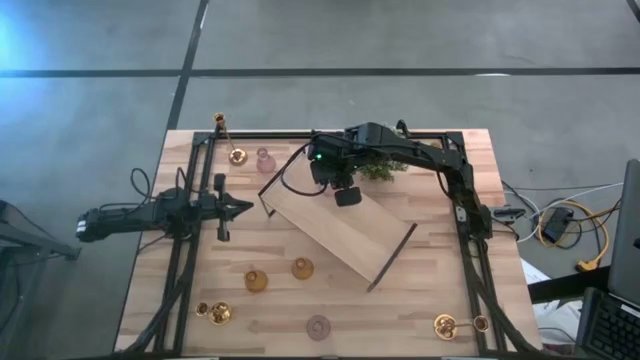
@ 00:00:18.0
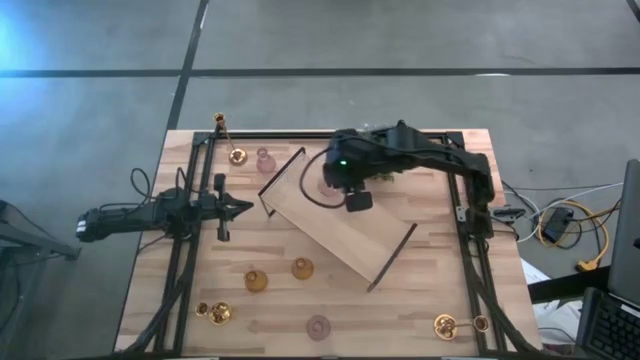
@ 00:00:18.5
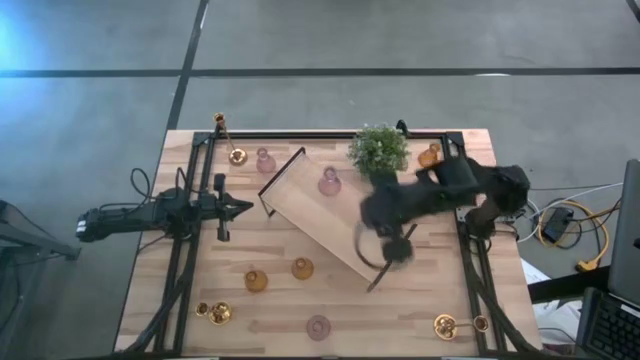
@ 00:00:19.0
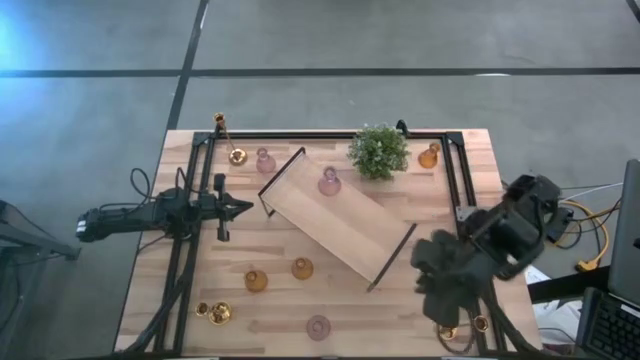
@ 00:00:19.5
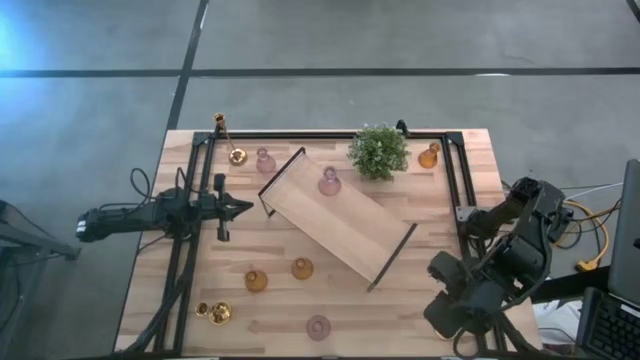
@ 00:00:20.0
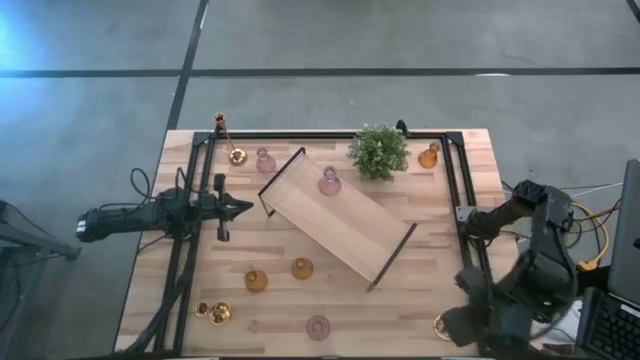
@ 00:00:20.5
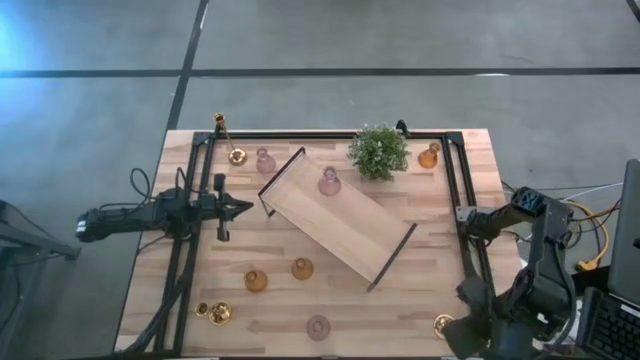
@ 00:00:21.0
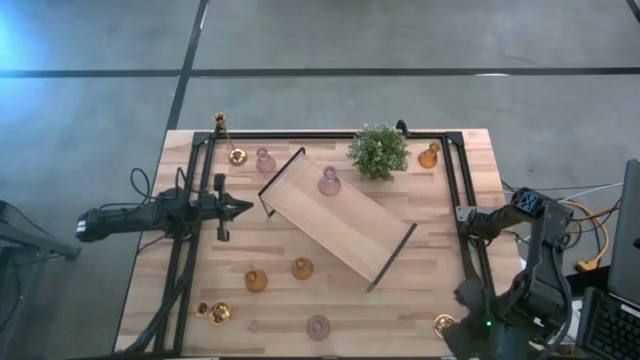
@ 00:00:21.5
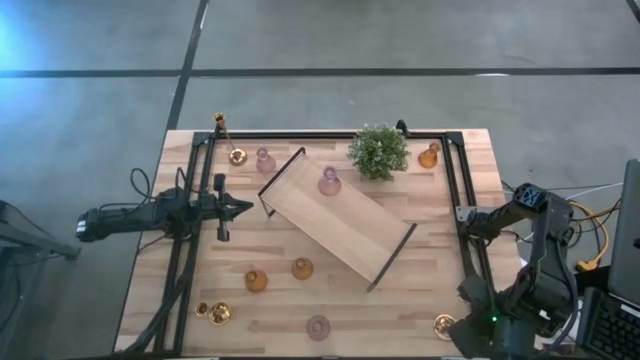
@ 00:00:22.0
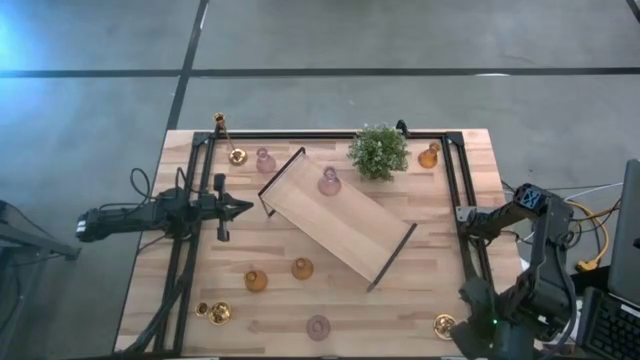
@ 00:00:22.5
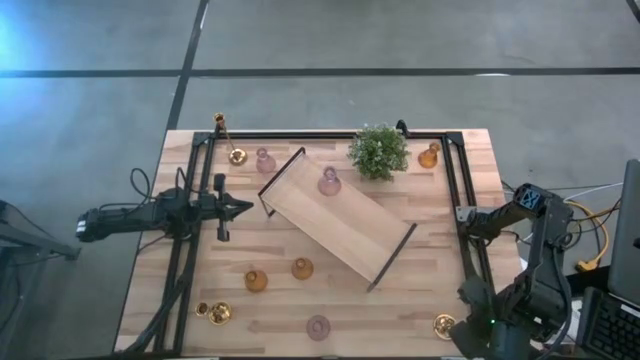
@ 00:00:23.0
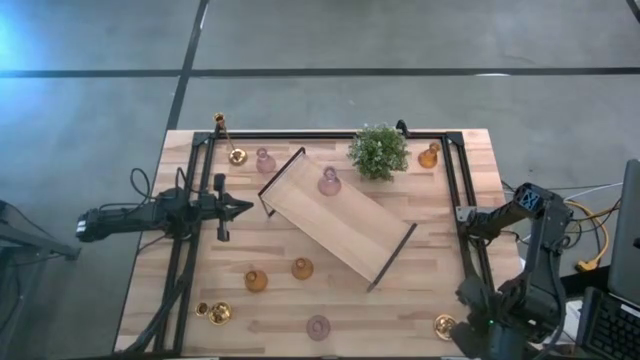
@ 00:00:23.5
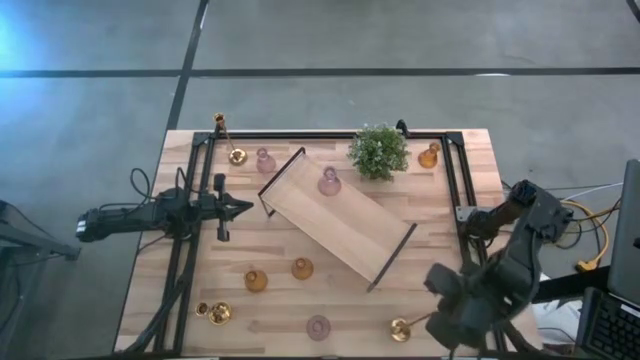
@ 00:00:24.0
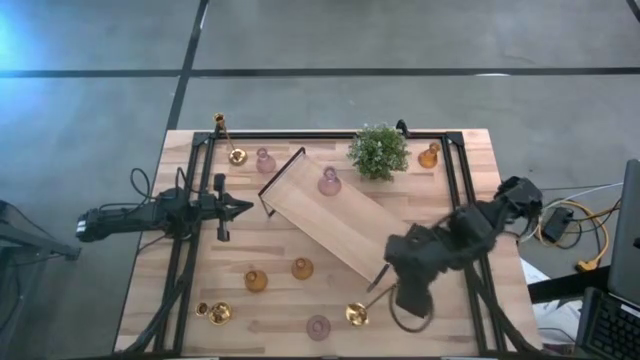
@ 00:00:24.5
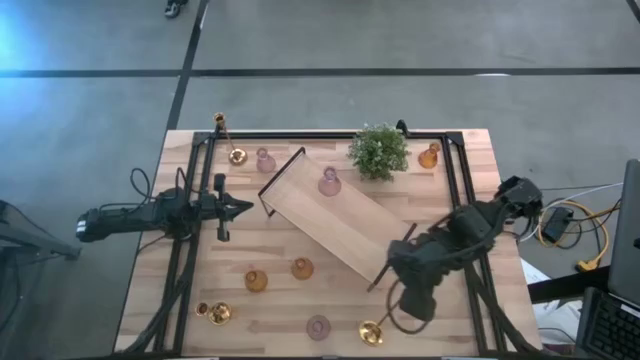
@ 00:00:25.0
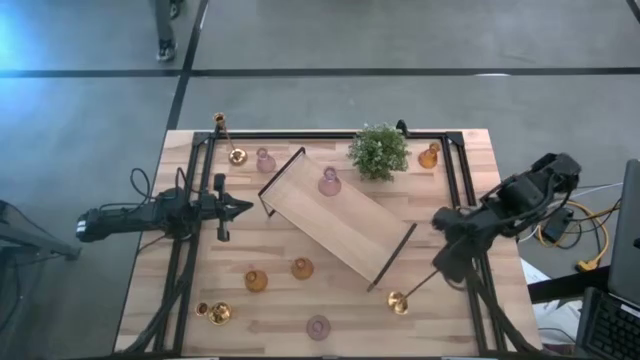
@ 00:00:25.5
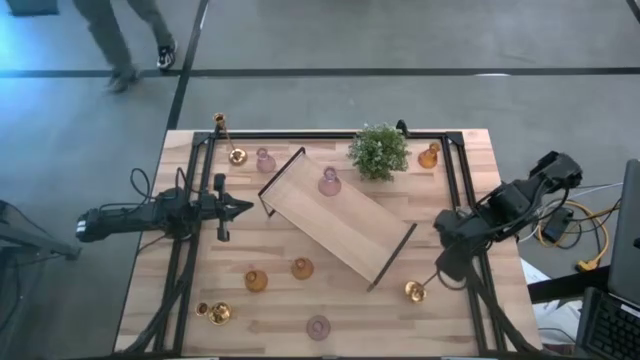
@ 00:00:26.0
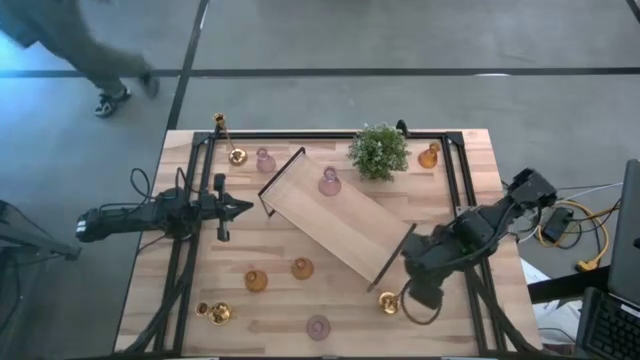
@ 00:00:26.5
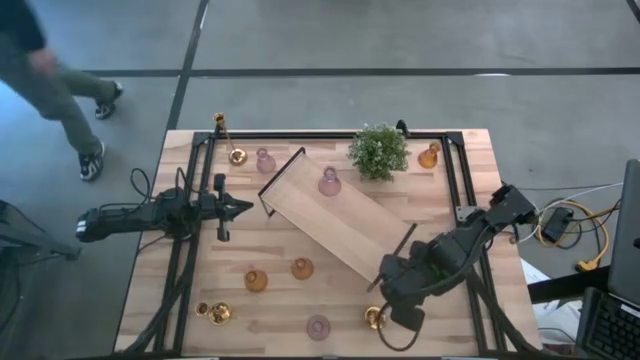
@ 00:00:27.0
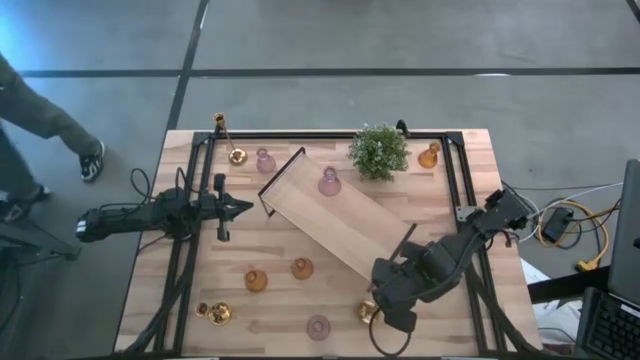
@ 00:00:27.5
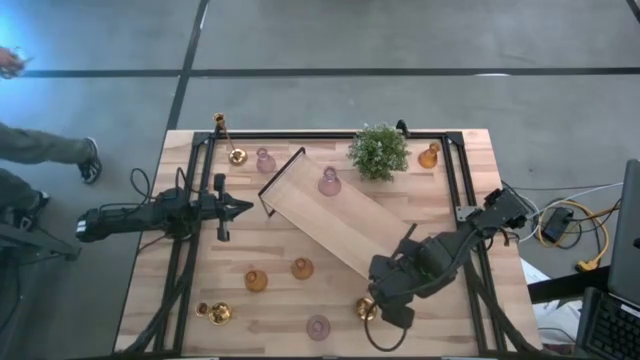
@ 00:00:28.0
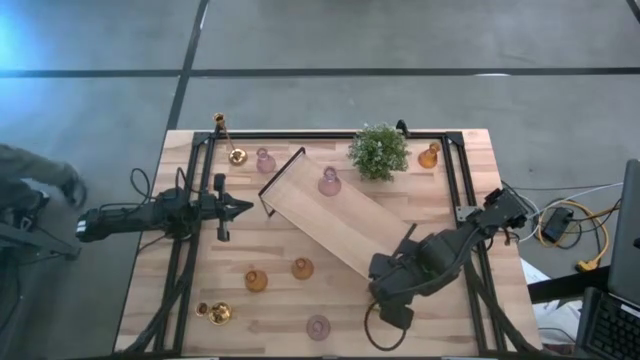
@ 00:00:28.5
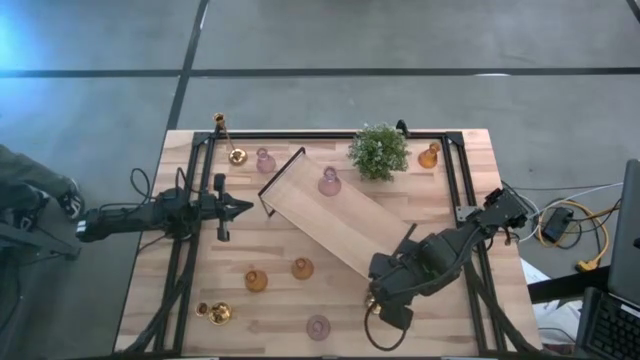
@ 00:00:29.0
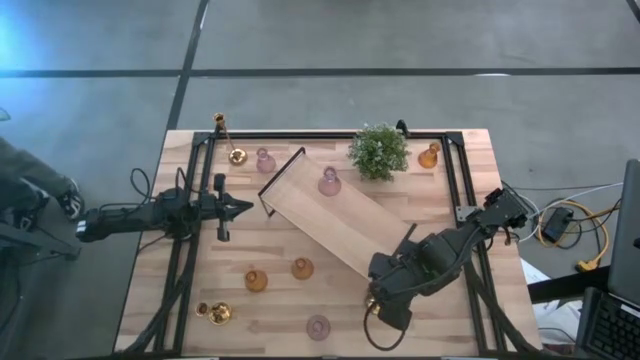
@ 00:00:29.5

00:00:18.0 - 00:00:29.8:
Task: Pick & Place candle stick holders
Move the gold candle holder to the center of the table

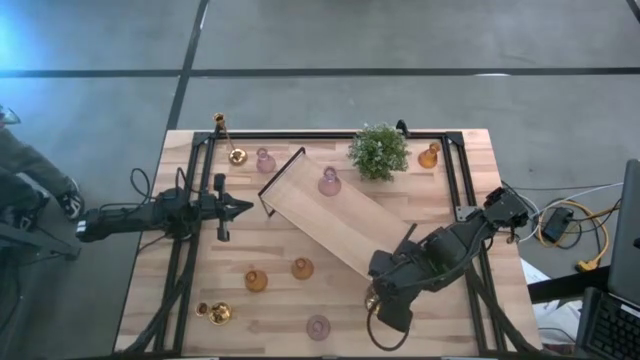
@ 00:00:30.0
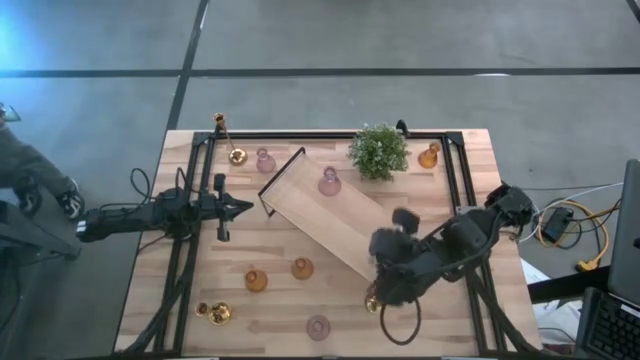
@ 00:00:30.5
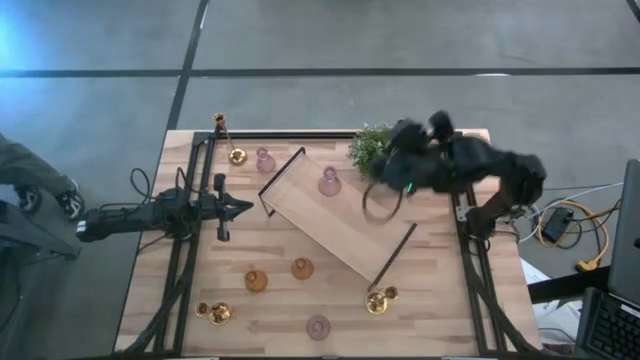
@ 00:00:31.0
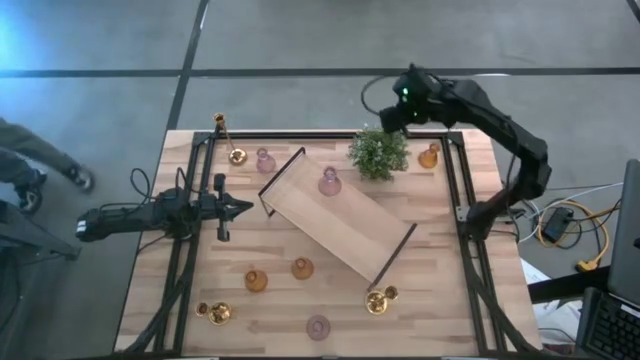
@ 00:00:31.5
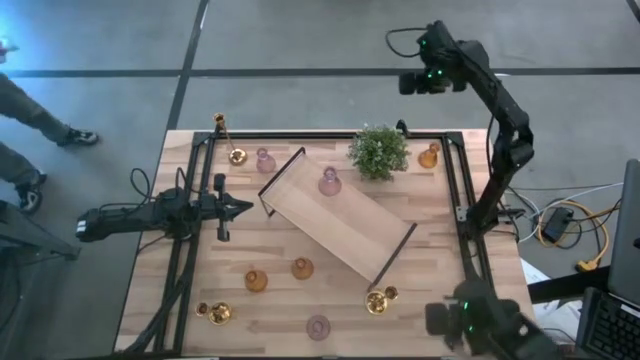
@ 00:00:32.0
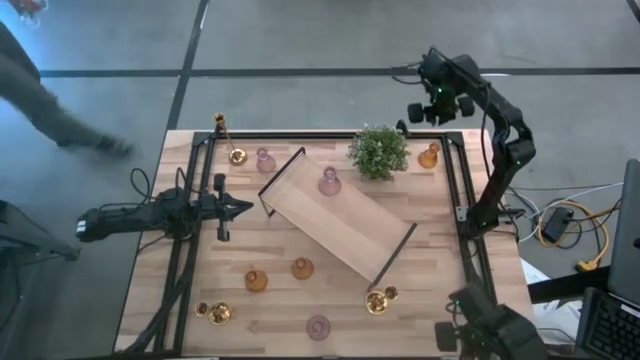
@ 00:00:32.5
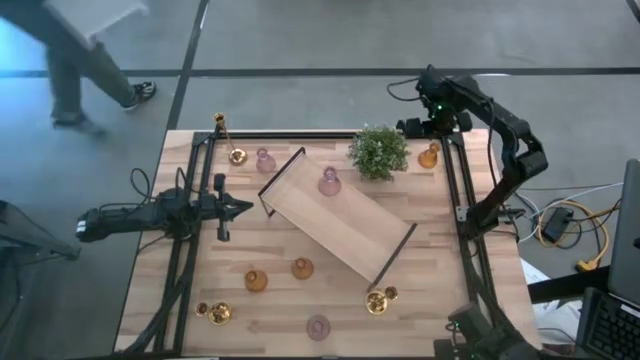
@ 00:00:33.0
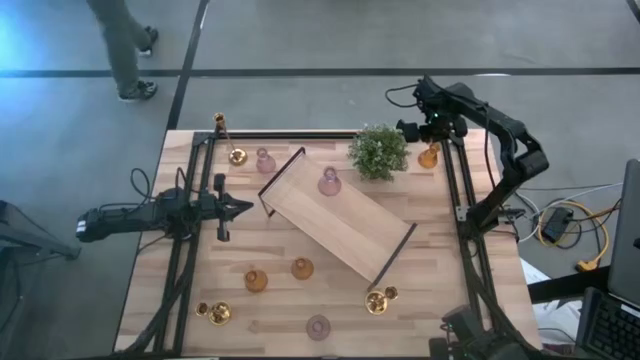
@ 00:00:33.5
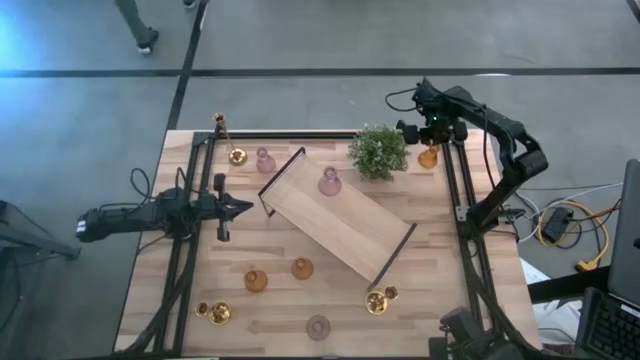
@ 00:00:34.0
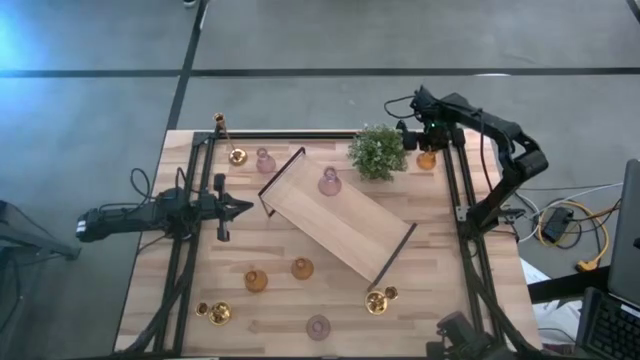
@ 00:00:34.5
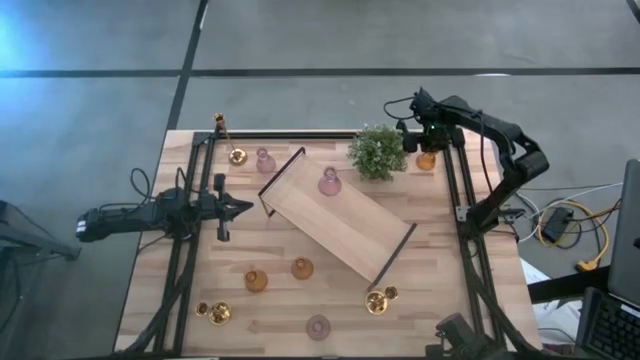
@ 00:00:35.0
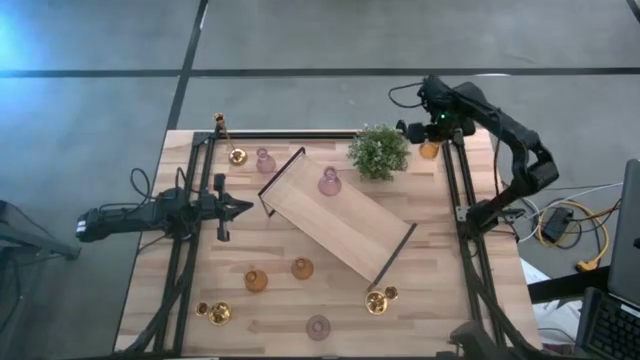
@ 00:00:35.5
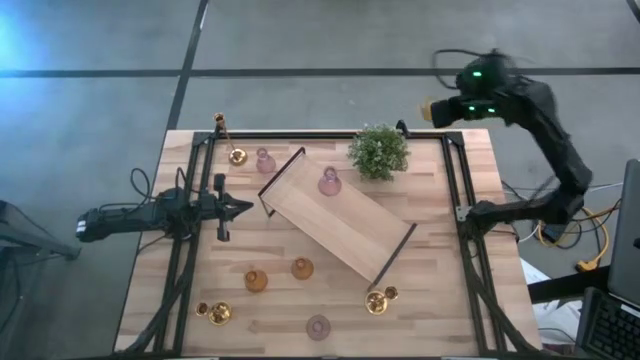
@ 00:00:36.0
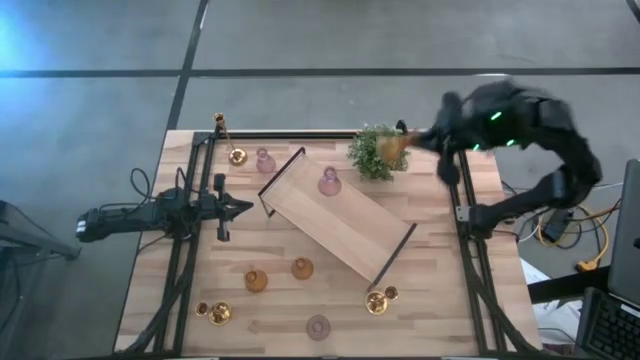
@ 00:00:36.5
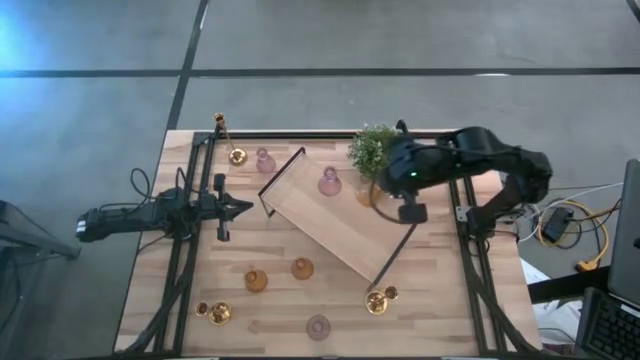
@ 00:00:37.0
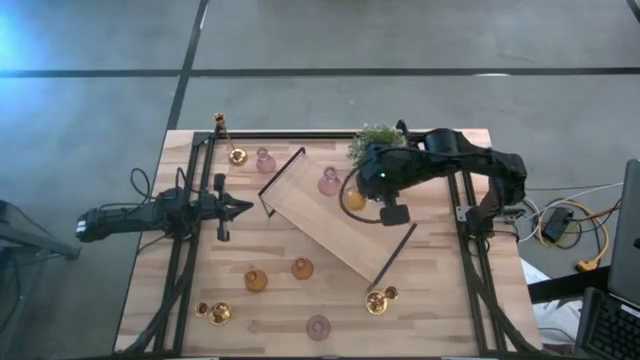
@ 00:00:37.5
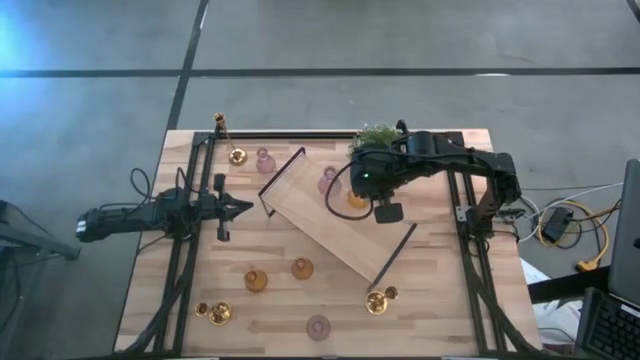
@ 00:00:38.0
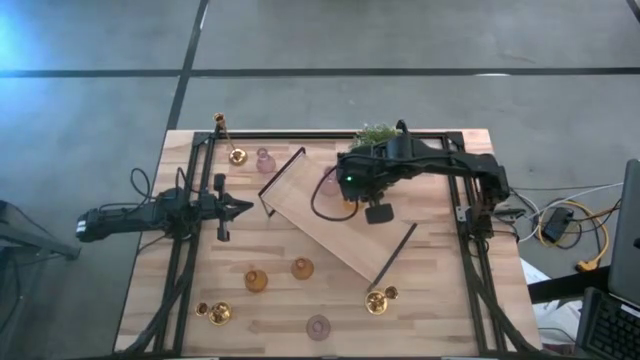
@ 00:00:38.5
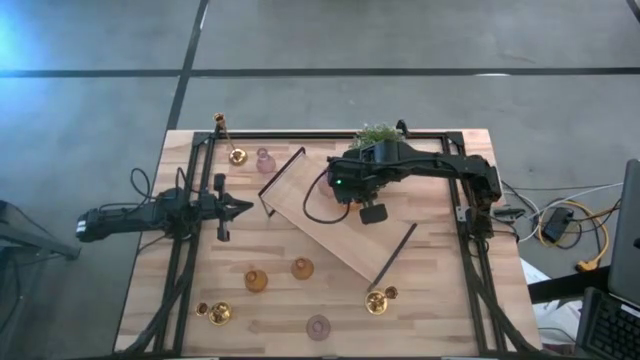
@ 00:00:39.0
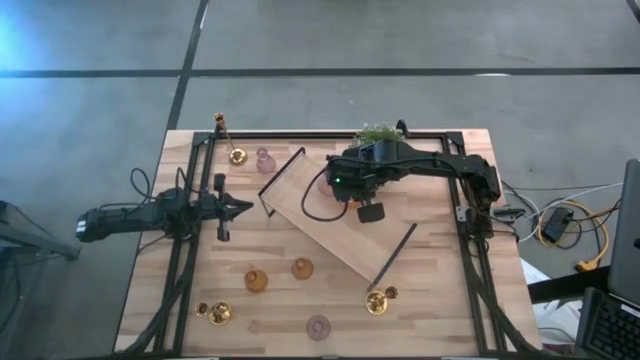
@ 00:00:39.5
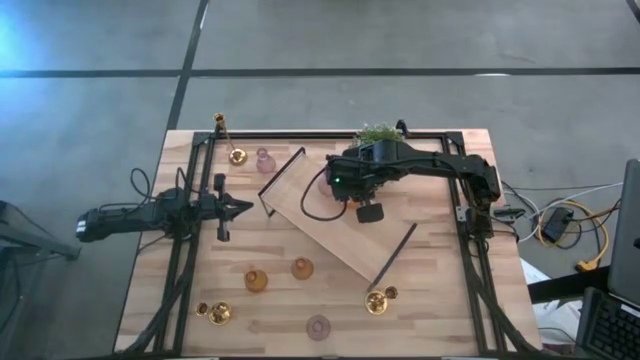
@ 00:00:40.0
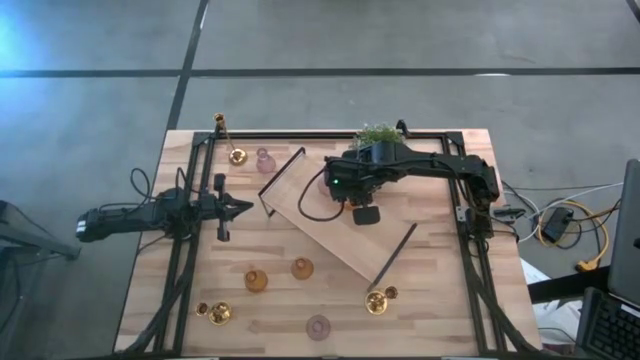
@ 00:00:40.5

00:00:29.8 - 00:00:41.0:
Put the yellow glass candle holder on the shelf
